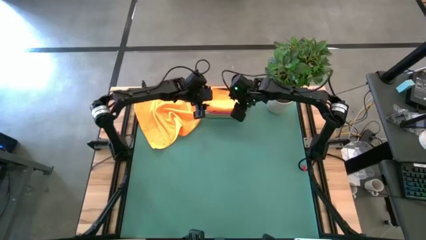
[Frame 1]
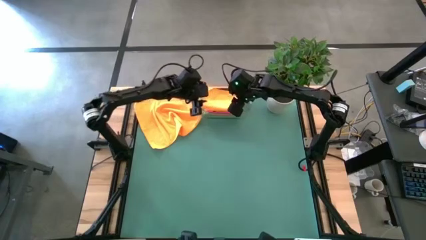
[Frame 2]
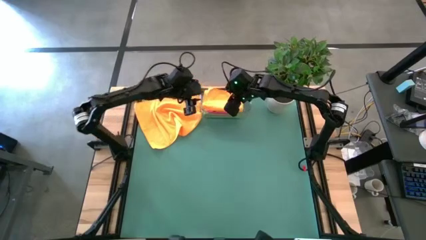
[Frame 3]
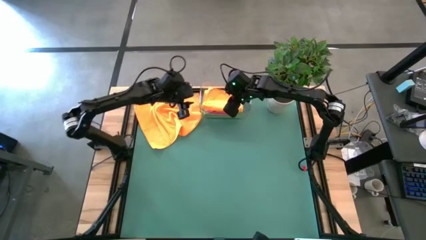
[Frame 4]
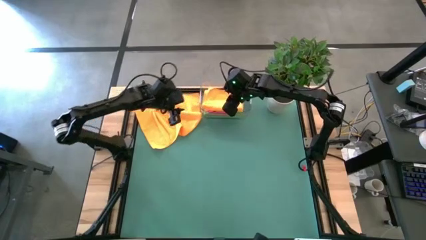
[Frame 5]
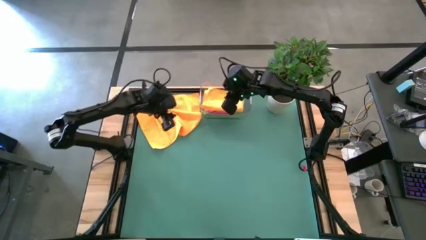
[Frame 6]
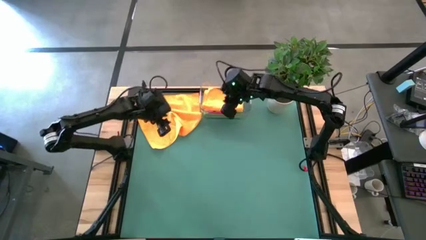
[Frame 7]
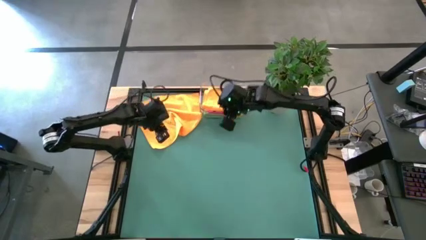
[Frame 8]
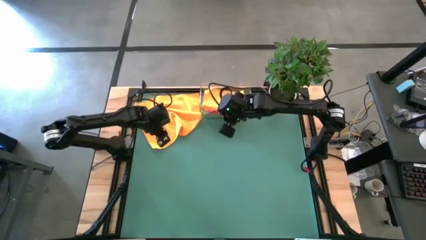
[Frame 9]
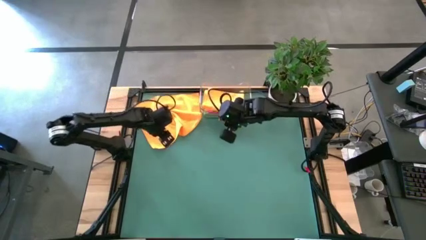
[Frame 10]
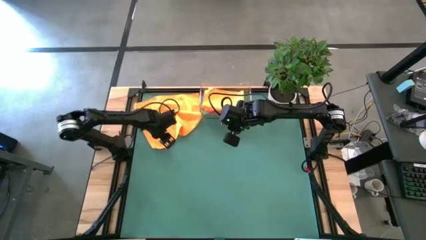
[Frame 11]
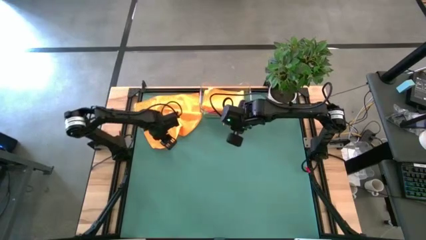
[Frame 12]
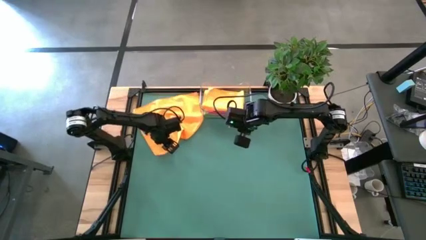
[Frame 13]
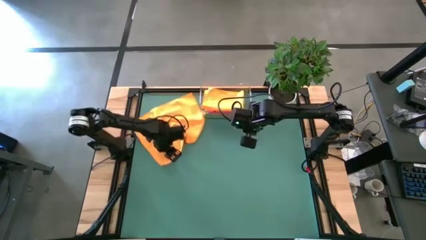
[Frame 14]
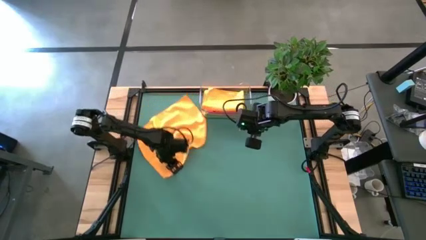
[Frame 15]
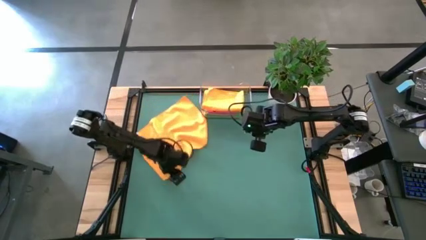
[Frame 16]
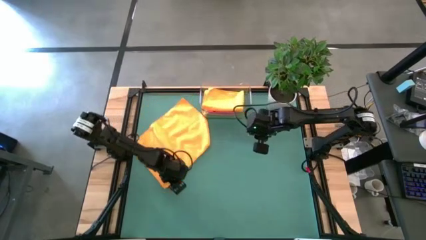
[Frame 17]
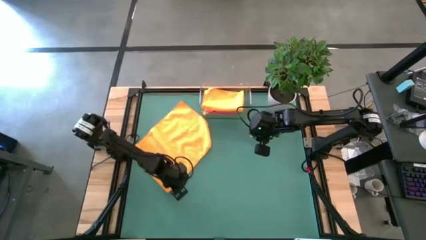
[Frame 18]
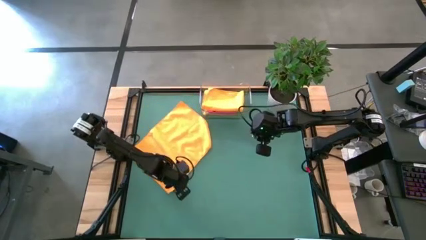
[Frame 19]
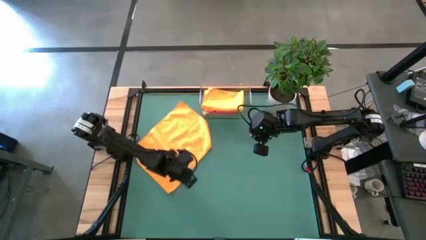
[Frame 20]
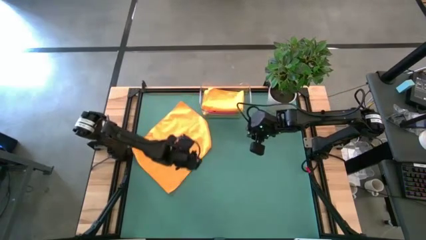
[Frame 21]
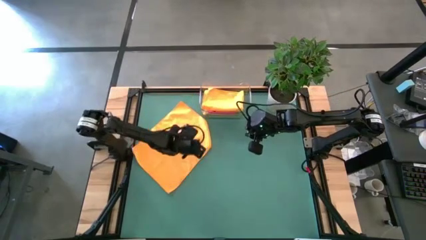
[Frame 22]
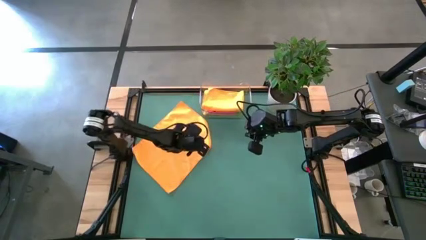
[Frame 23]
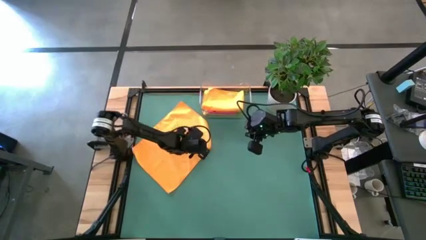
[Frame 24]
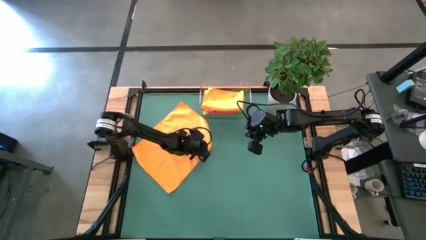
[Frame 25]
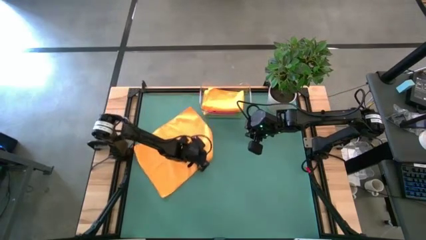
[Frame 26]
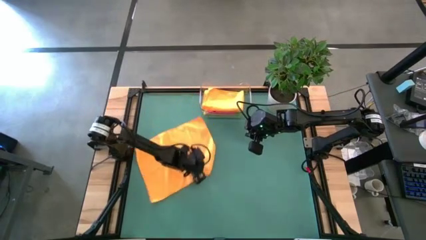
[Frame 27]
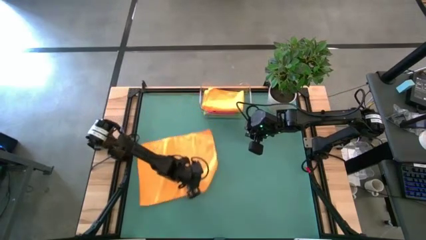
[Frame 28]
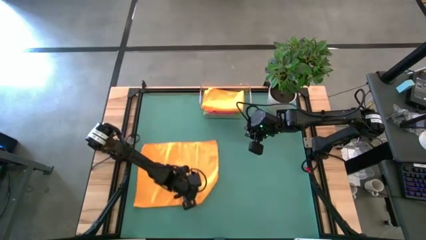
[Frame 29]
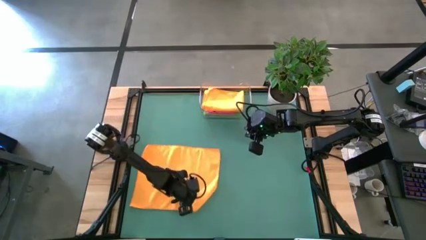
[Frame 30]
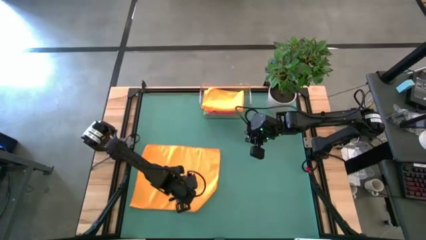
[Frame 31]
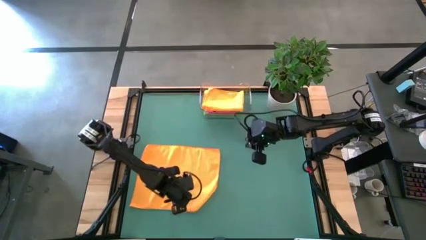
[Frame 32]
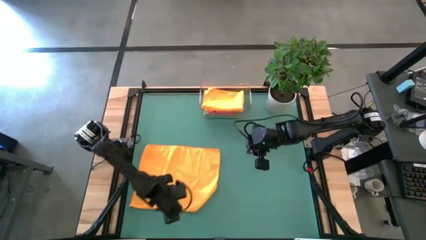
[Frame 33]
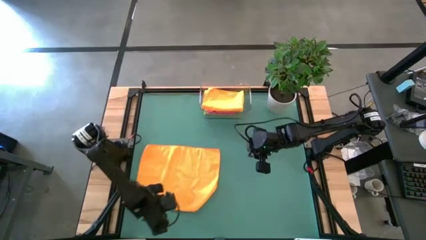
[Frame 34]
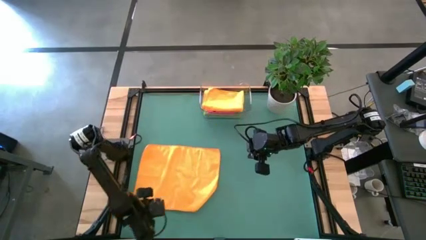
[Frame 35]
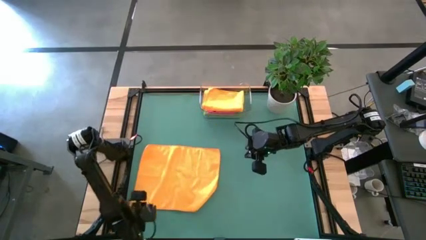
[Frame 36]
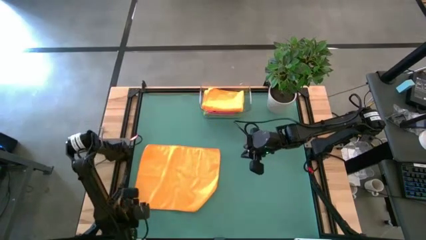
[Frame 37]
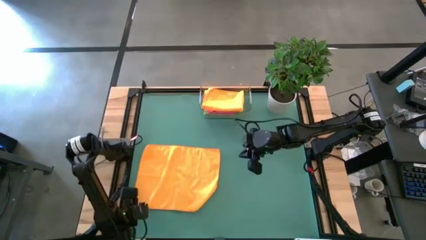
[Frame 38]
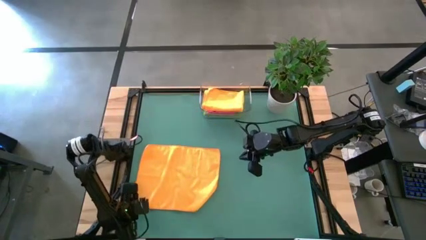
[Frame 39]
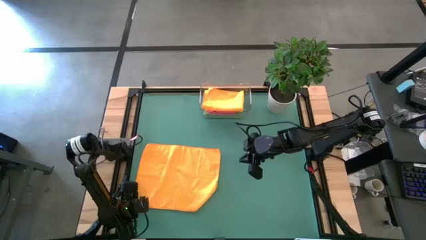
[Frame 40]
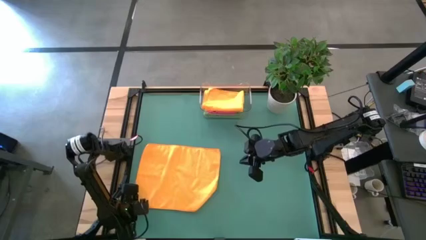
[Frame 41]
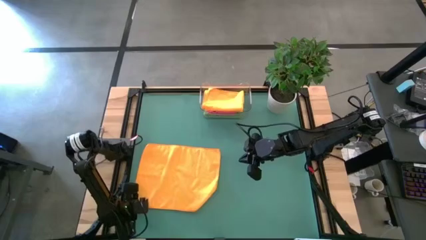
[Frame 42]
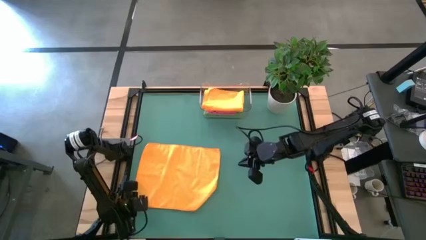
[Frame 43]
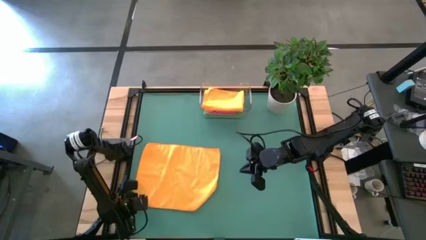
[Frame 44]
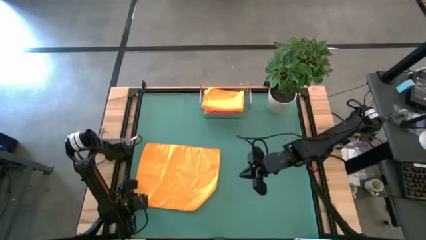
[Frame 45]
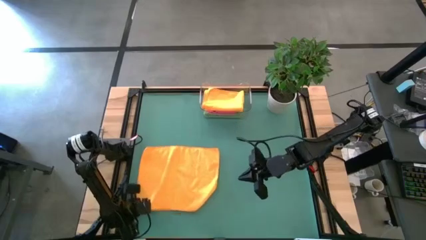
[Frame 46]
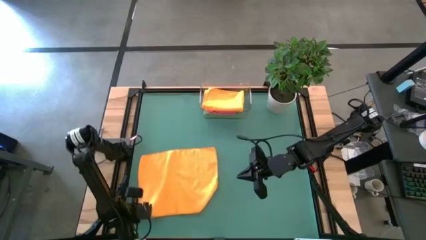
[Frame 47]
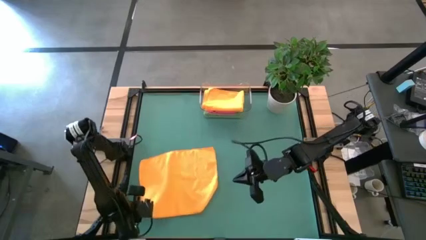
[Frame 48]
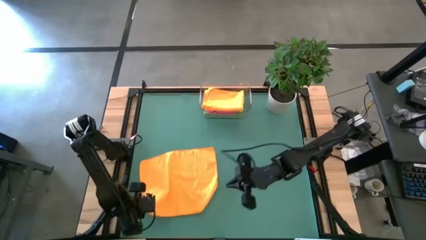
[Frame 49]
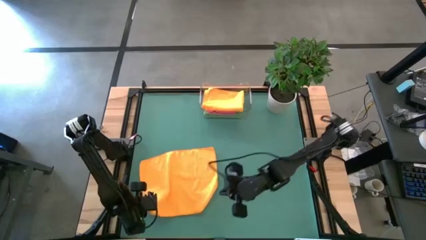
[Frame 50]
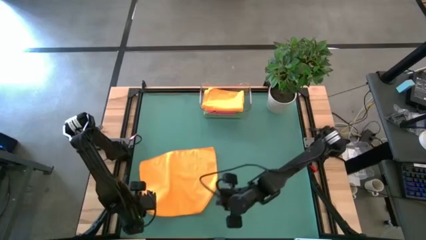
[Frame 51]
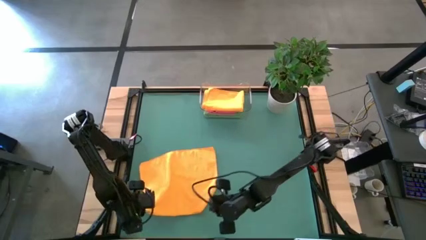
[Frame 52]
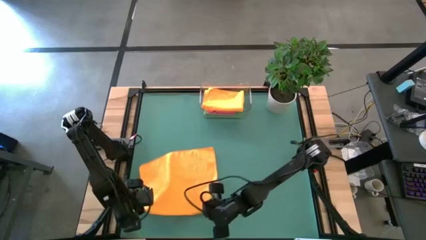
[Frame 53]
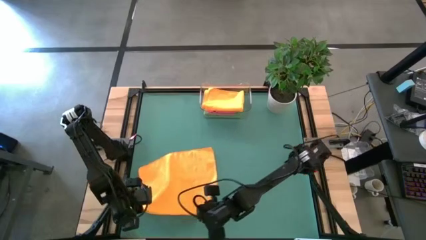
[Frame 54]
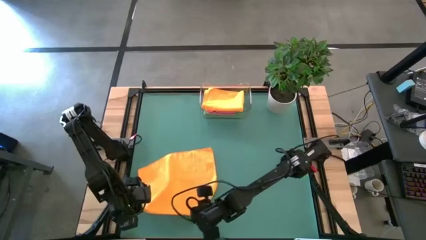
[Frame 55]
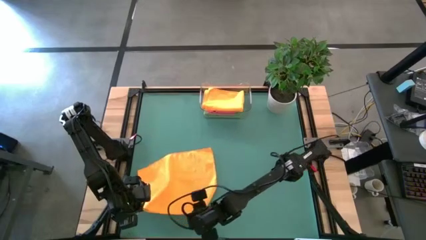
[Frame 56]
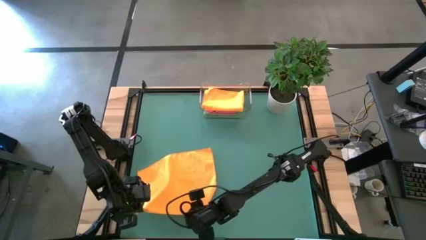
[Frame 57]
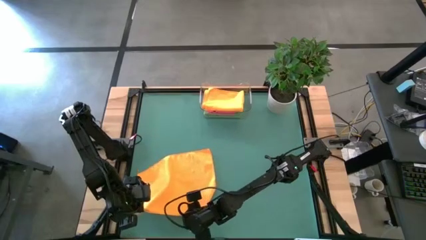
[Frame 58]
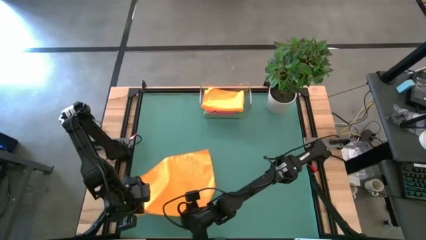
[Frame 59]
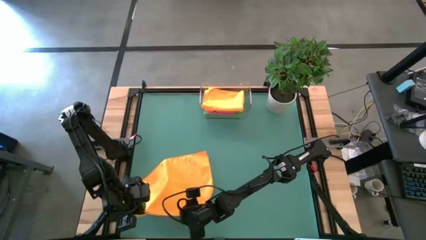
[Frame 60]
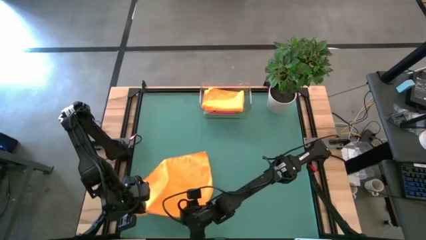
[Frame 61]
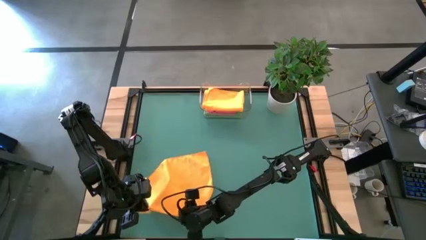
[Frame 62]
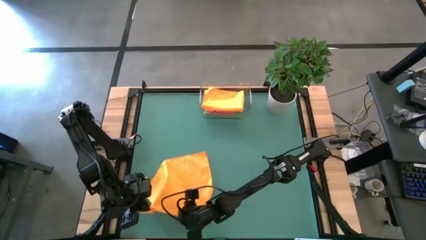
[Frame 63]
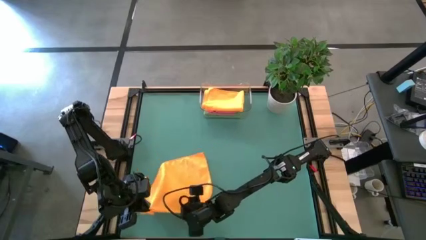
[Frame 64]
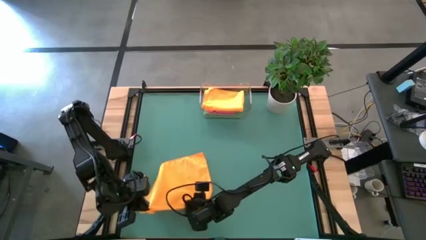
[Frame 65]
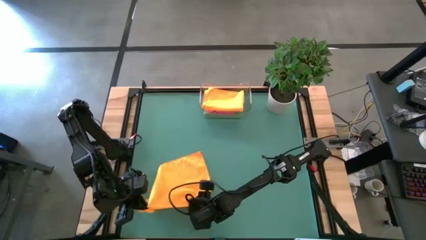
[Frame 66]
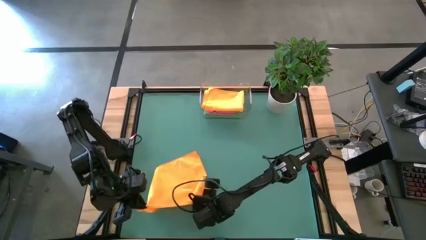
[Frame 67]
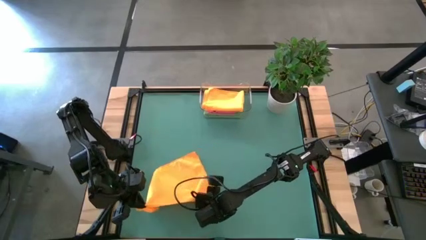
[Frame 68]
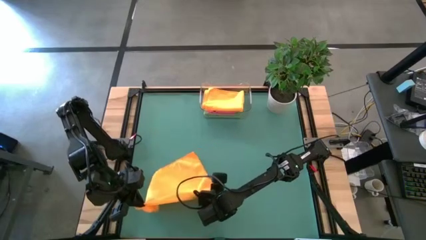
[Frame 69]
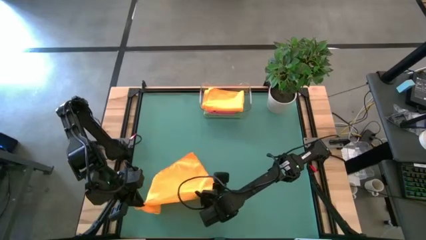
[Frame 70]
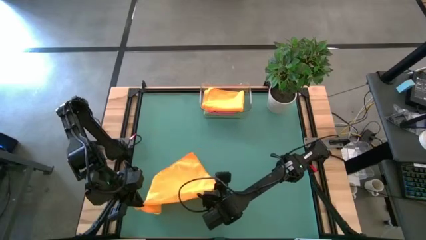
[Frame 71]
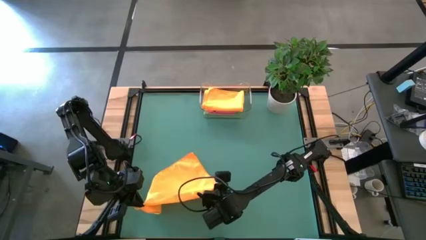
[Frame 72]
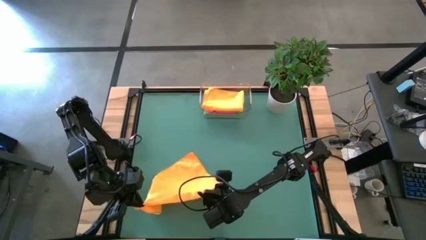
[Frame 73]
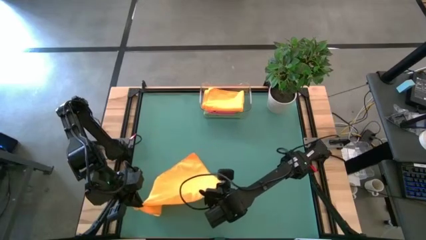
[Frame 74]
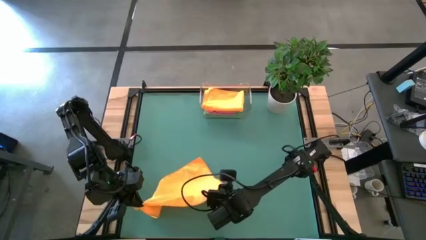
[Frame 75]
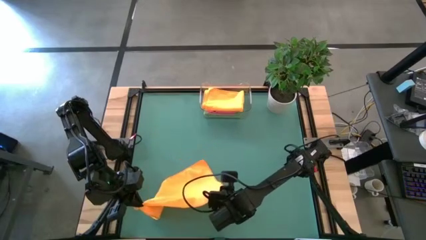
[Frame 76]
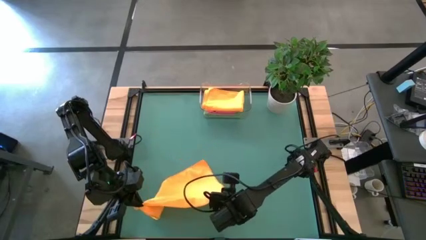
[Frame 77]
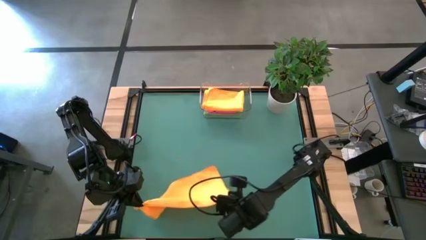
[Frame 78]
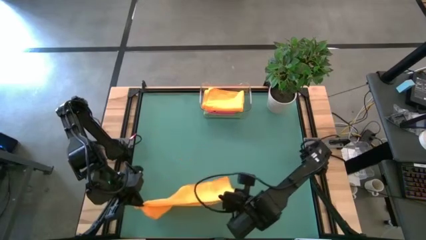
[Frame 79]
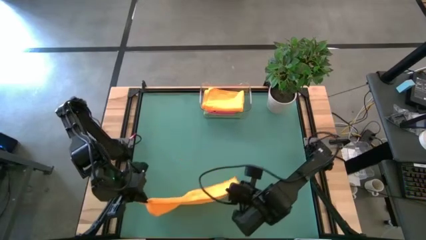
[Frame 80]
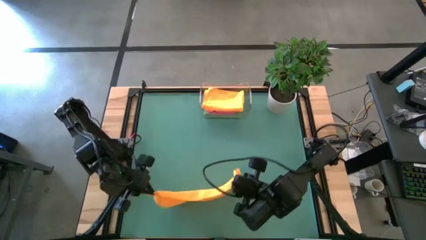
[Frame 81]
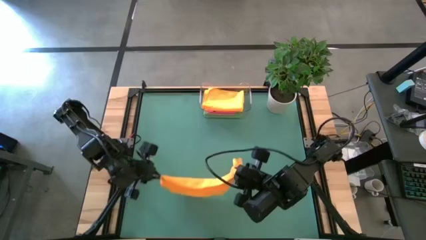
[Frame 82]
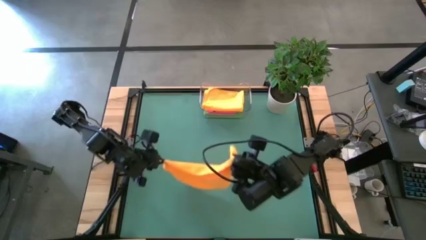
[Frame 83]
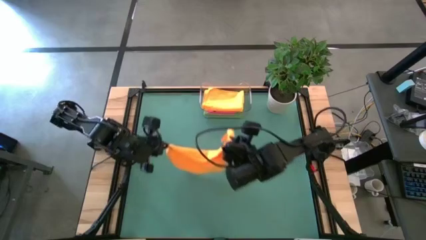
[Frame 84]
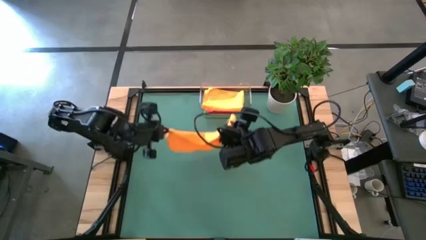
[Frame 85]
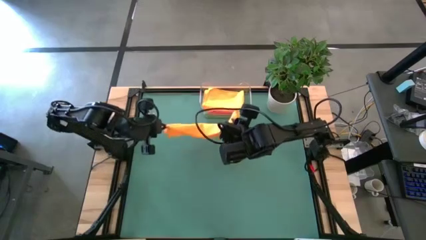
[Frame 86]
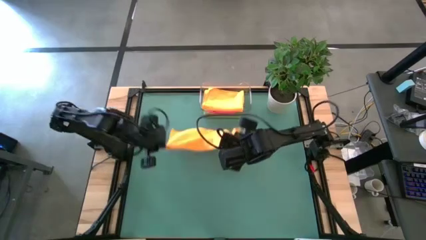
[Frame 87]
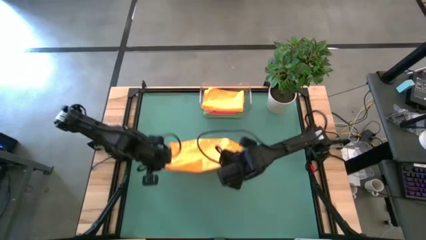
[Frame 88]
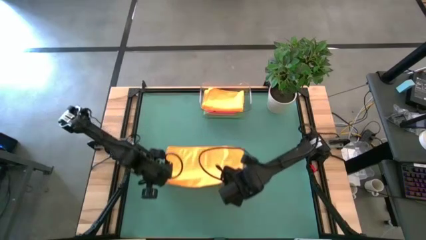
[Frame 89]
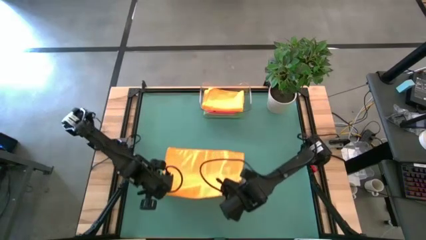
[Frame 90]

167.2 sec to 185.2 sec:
Task: Fold microfiber towels
Fold the orange towel
